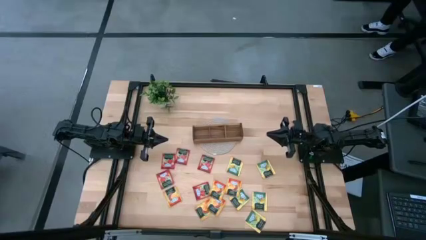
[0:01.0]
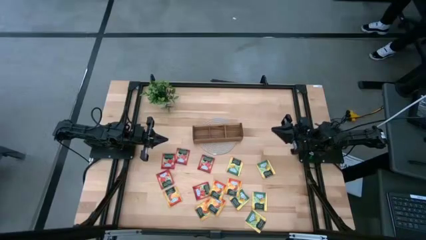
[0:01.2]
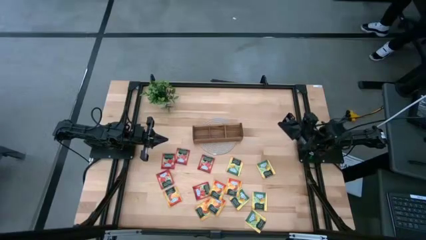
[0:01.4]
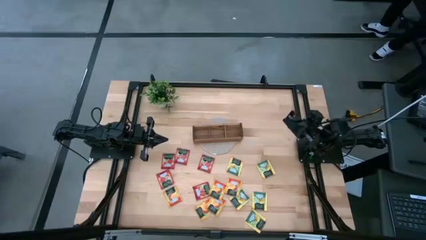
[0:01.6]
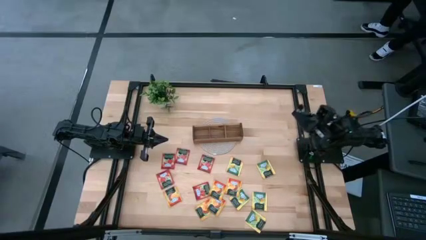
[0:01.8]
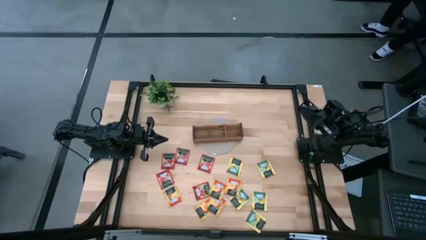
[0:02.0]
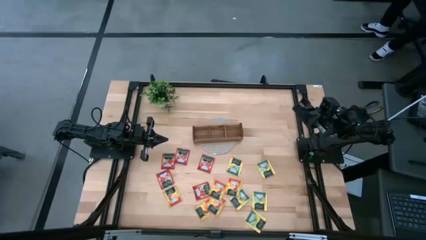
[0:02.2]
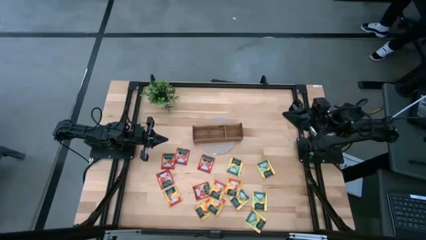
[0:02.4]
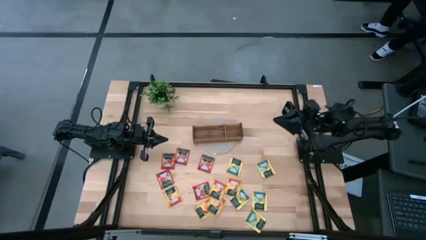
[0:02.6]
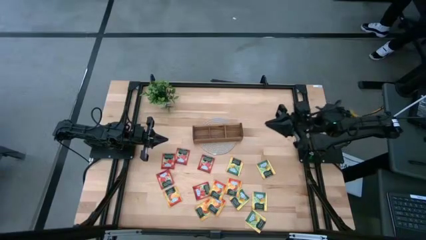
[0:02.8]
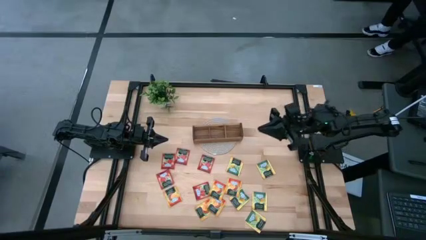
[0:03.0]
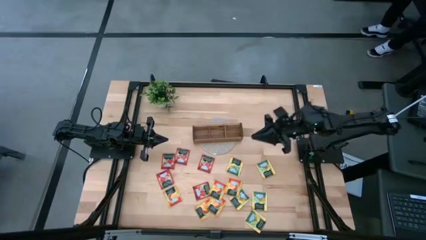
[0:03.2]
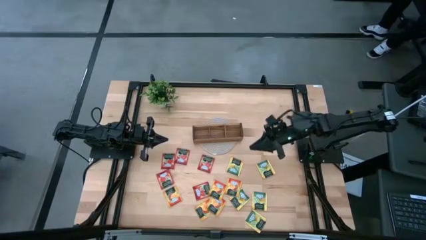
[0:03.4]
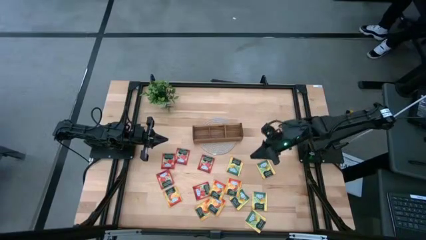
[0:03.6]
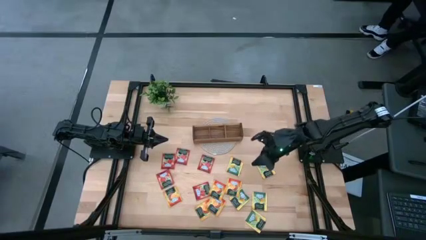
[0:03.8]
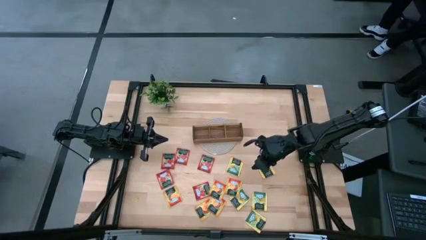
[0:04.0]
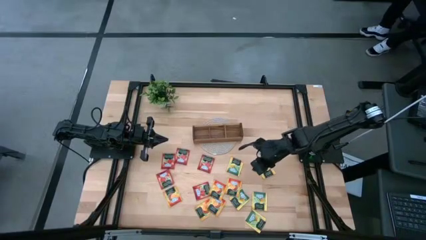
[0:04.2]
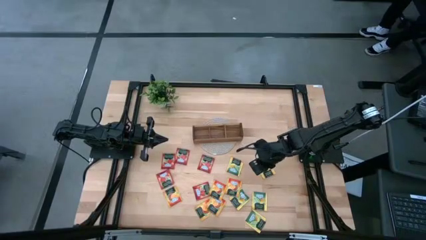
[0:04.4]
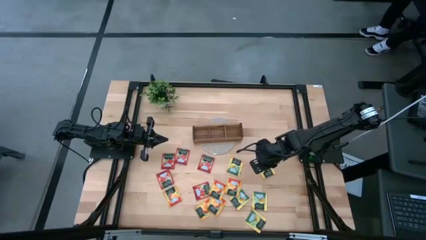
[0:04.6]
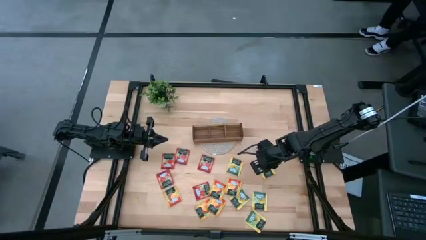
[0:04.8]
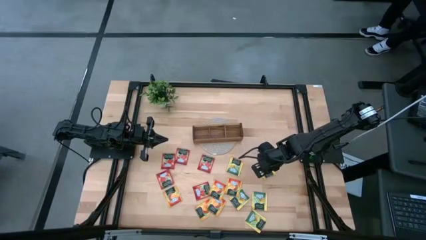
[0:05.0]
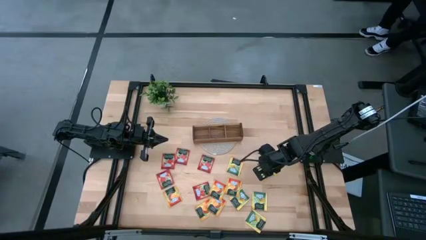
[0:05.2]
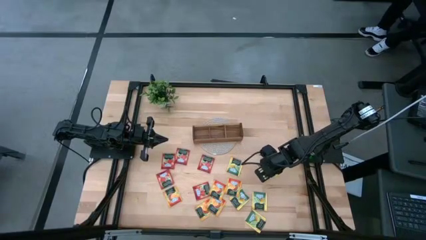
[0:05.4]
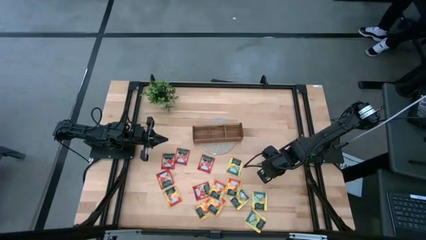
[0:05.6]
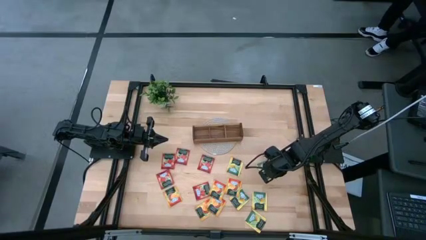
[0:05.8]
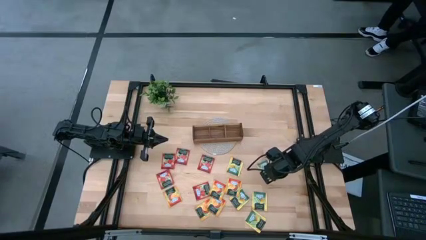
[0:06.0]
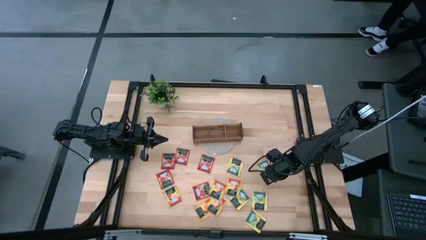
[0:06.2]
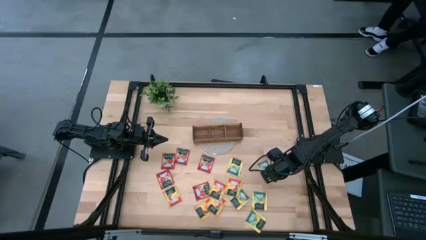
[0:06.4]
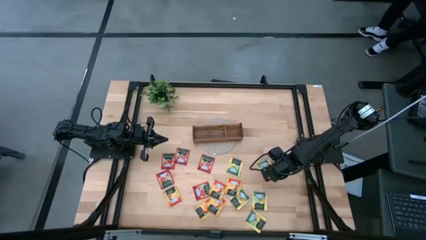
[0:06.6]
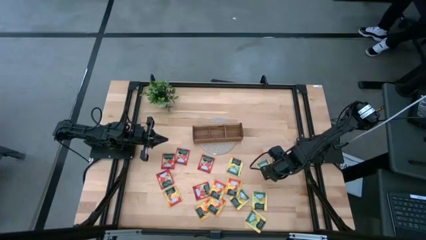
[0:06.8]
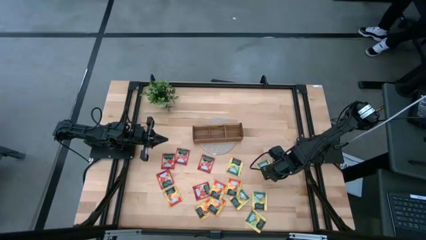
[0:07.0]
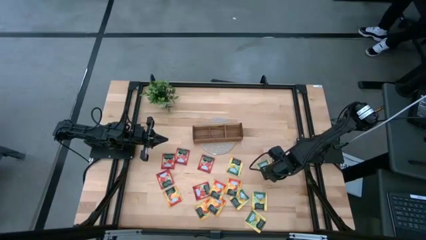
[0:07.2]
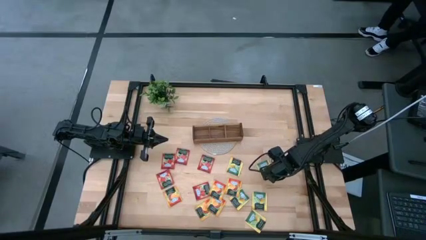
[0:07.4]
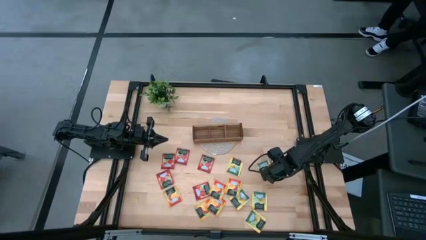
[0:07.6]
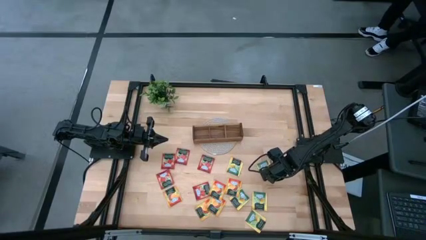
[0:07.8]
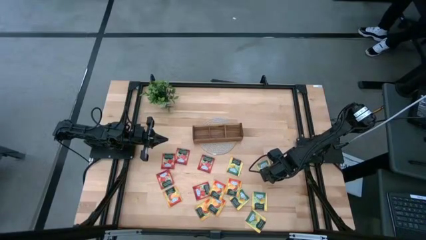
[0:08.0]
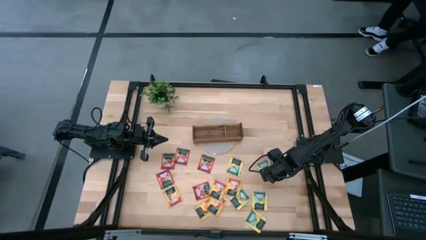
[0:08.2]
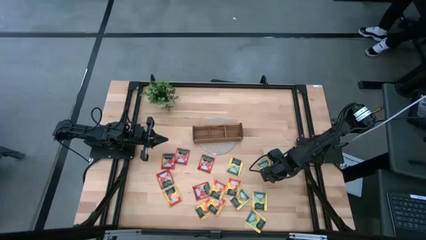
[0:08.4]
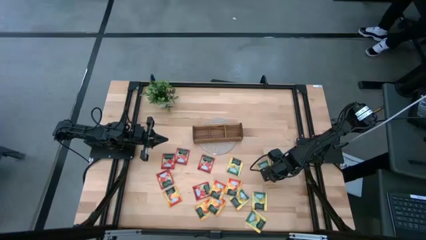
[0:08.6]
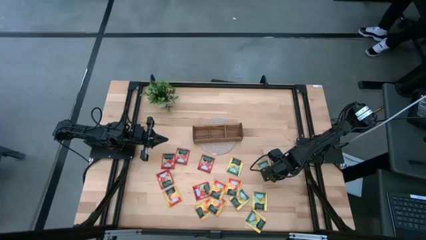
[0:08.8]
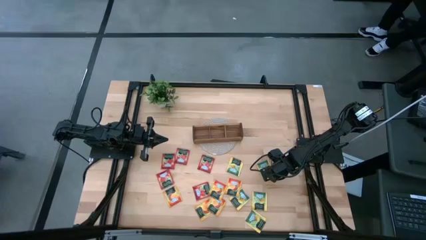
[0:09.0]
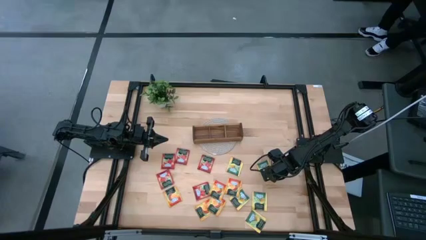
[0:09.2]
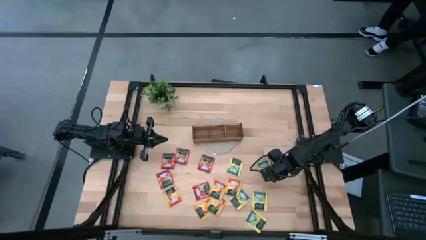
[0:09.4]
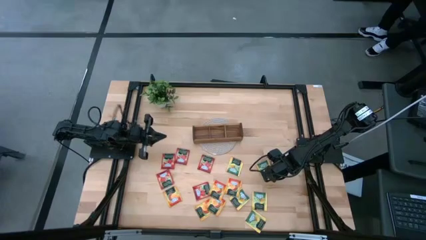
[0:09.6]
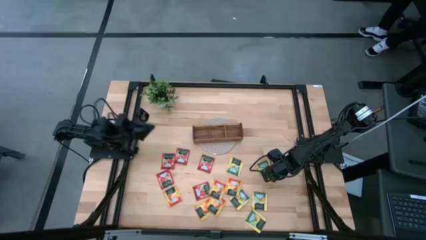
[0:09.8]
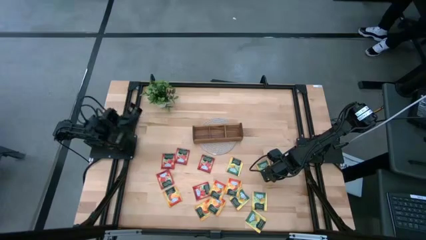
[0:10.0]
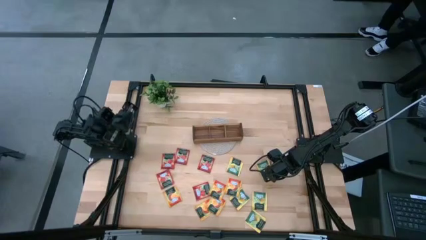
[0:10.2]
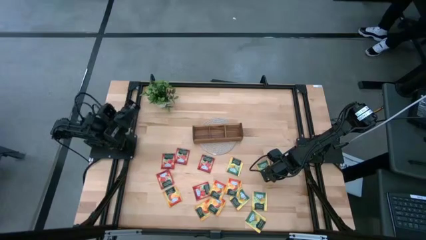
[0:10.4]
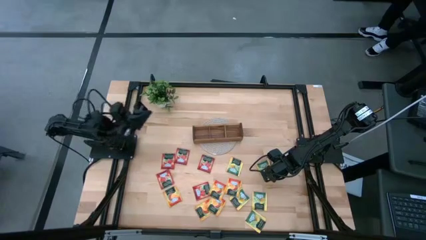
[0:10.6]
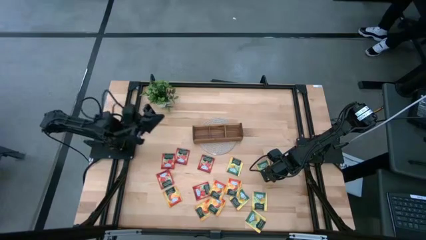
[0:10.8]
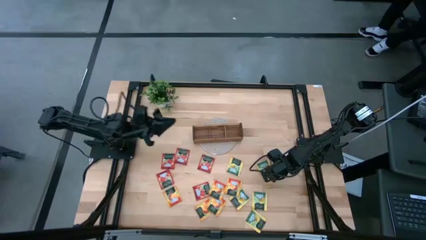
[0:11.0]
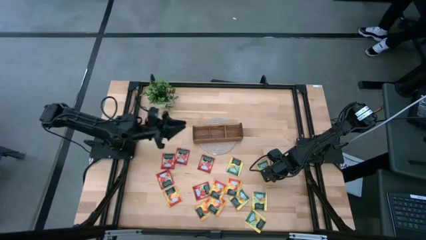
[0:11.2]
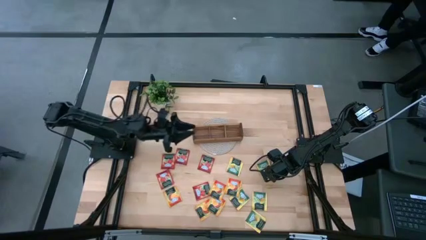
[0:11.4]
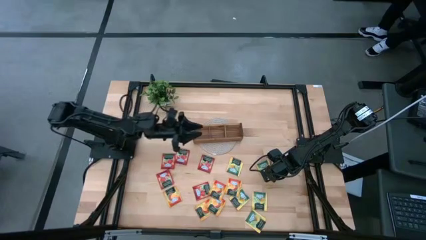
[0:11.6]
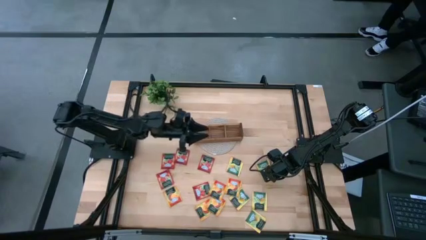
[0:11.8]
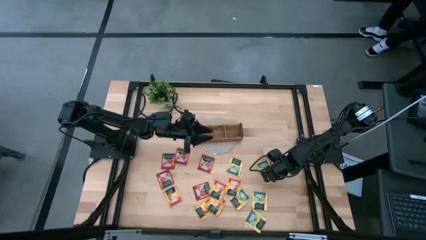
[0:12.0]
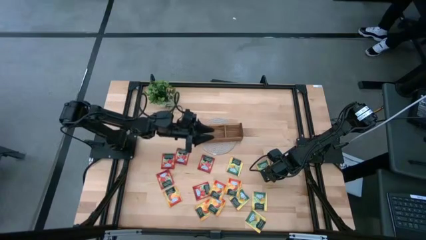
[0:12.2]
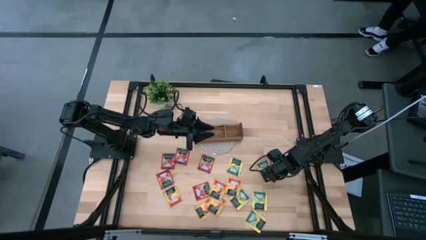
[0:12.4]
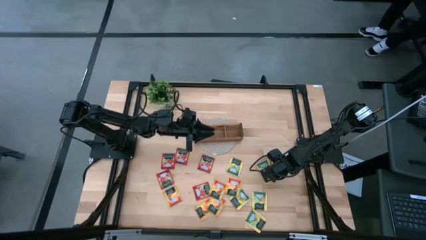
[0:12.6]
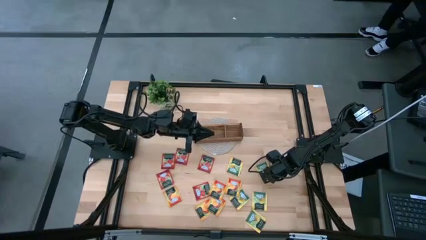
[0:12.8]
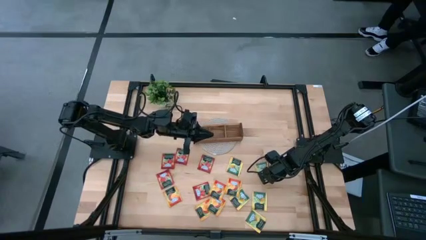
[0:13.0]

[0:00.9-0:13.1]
Task: Pick & Place Tea
Put the yellow tea bag into the right section of the wooden organizer
